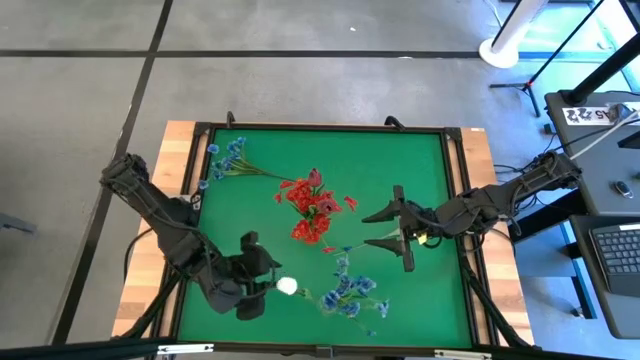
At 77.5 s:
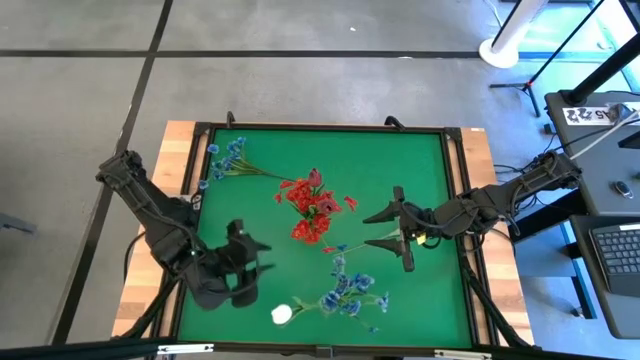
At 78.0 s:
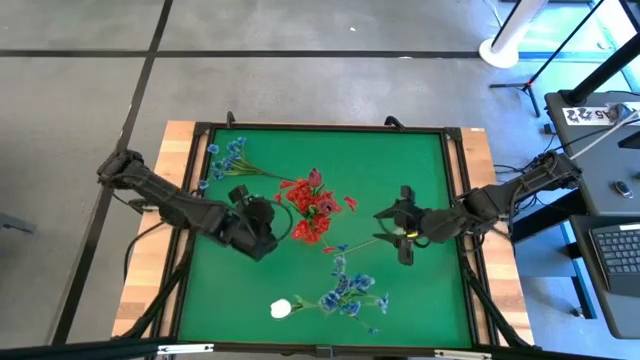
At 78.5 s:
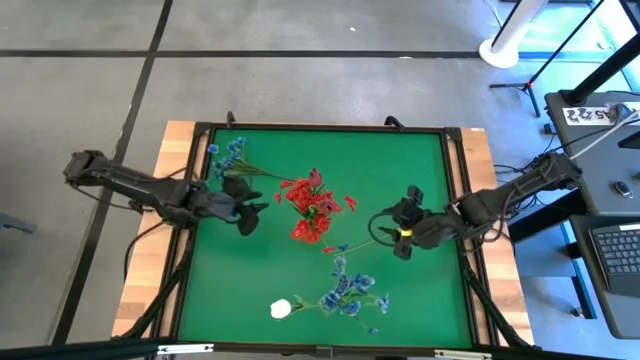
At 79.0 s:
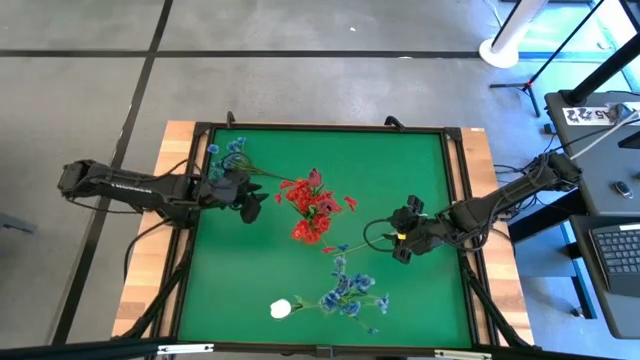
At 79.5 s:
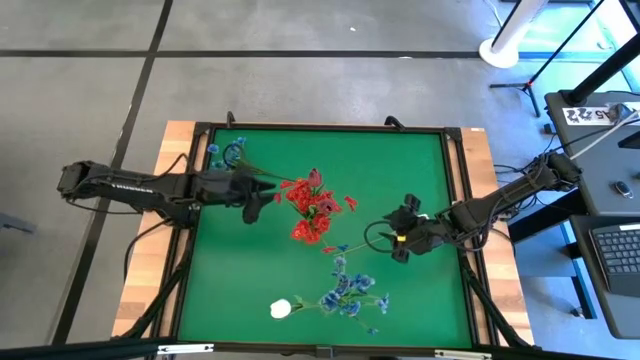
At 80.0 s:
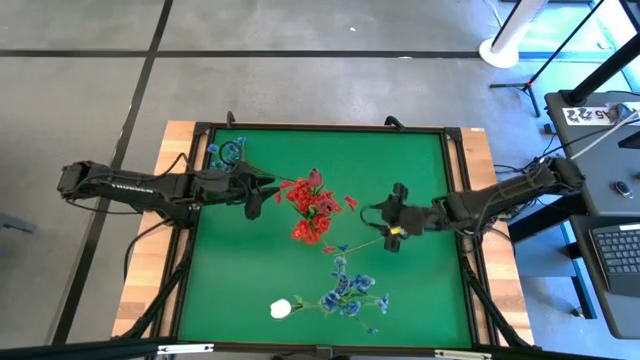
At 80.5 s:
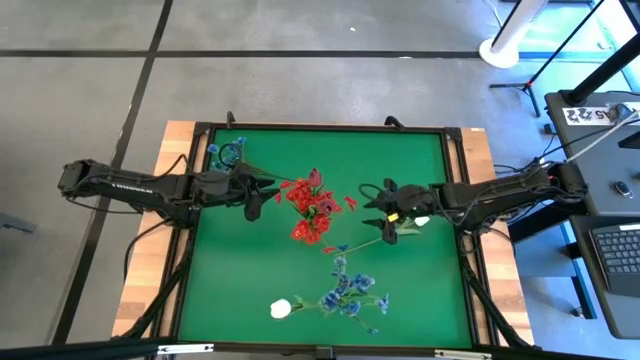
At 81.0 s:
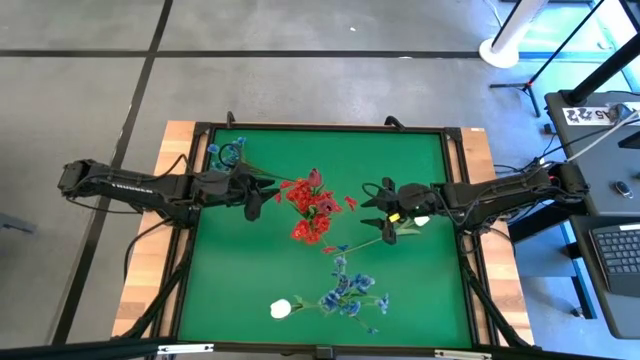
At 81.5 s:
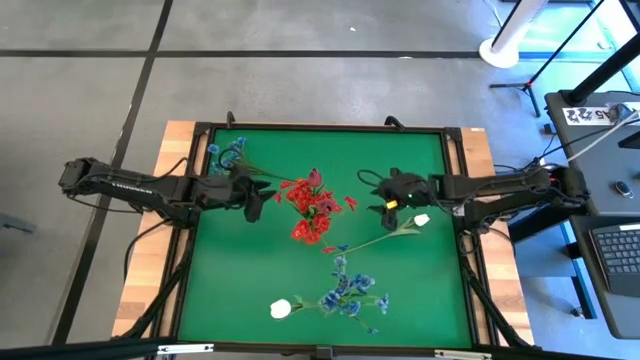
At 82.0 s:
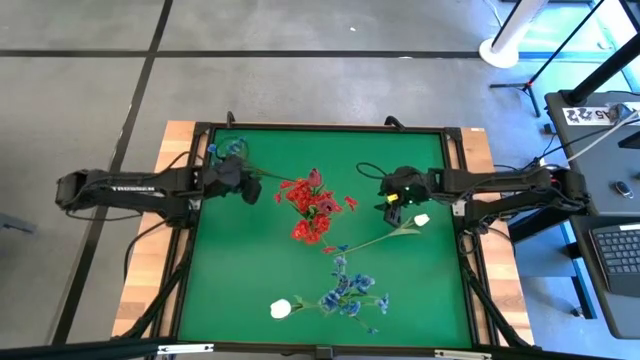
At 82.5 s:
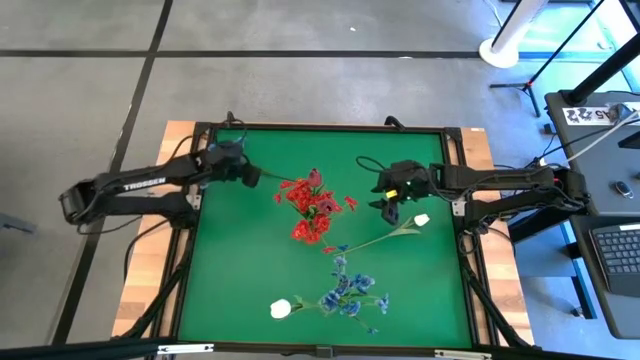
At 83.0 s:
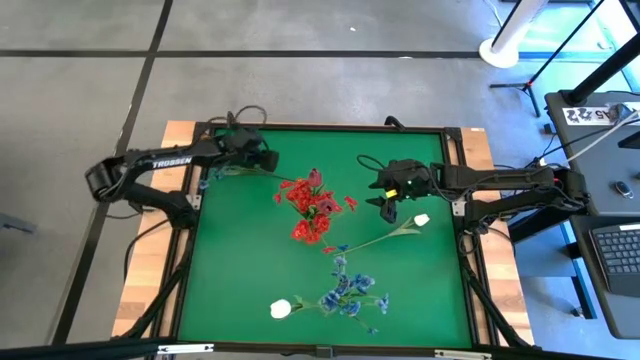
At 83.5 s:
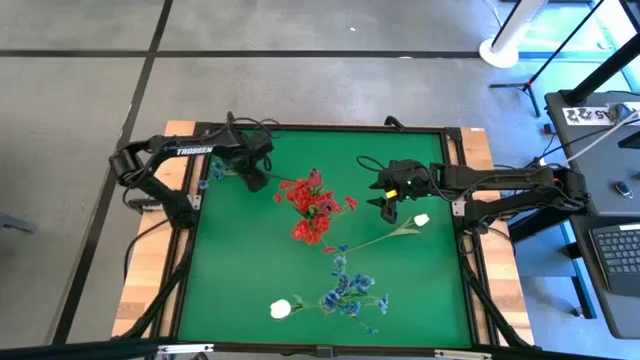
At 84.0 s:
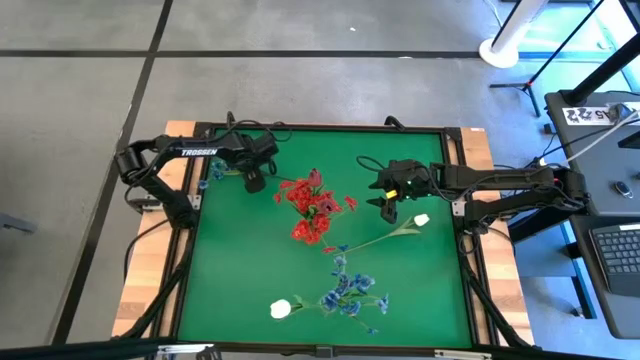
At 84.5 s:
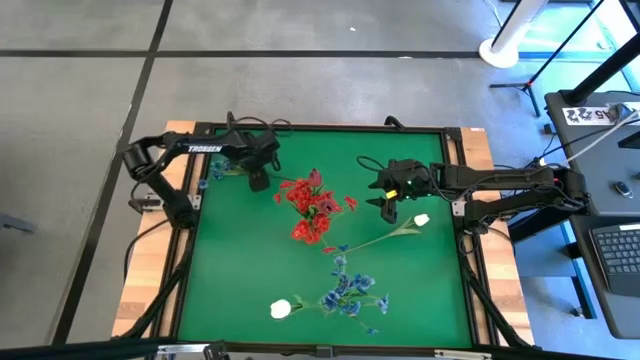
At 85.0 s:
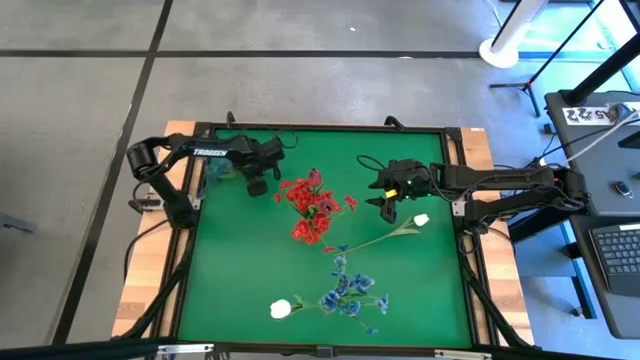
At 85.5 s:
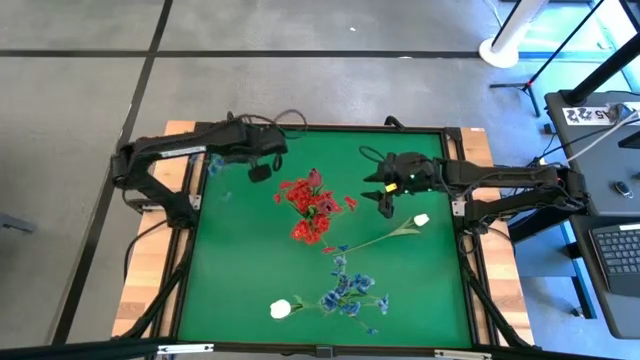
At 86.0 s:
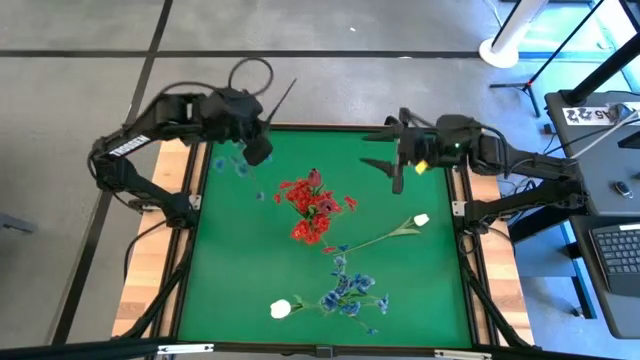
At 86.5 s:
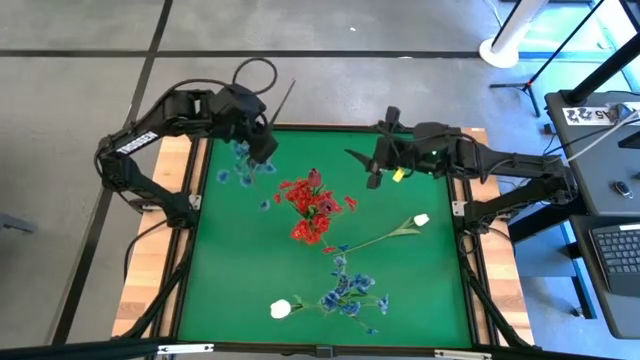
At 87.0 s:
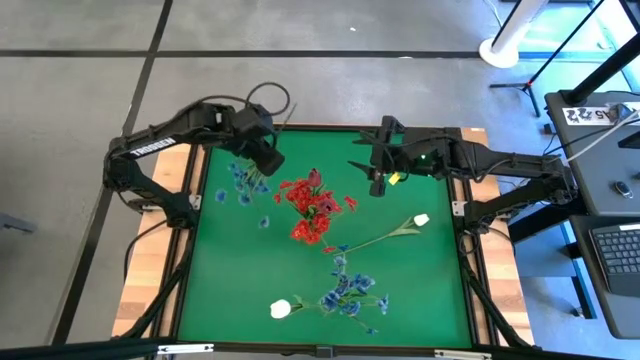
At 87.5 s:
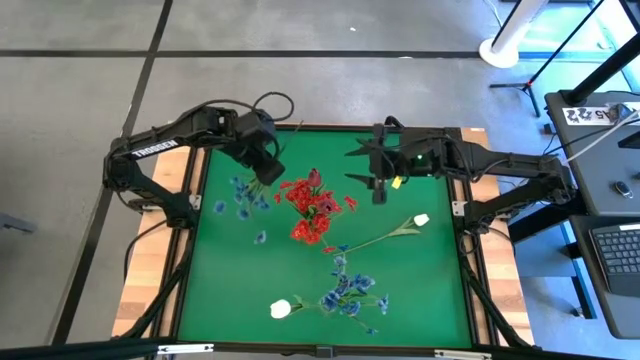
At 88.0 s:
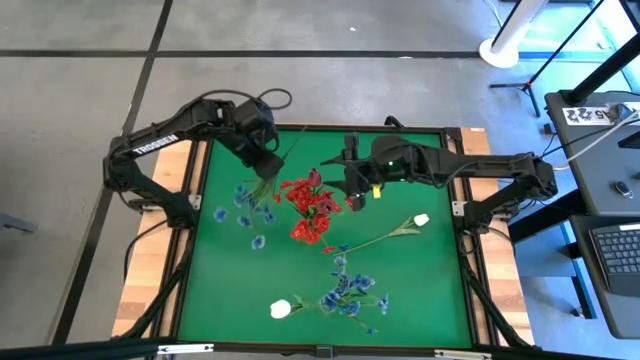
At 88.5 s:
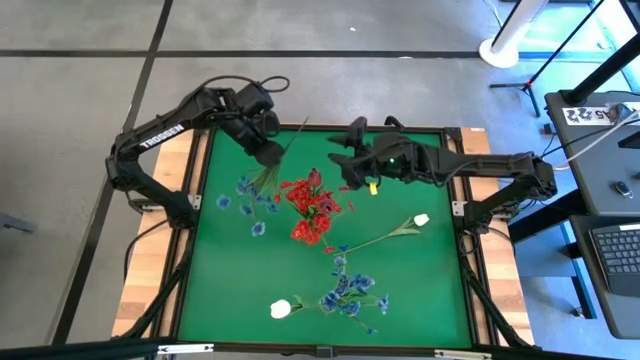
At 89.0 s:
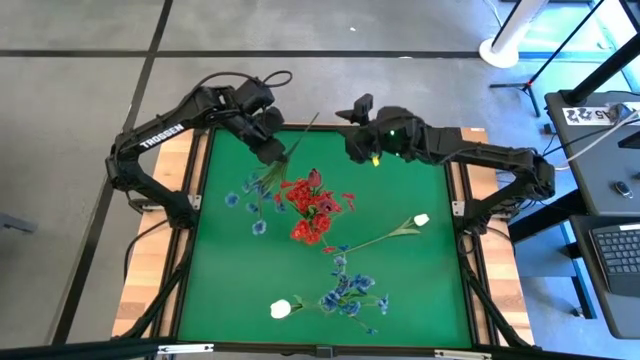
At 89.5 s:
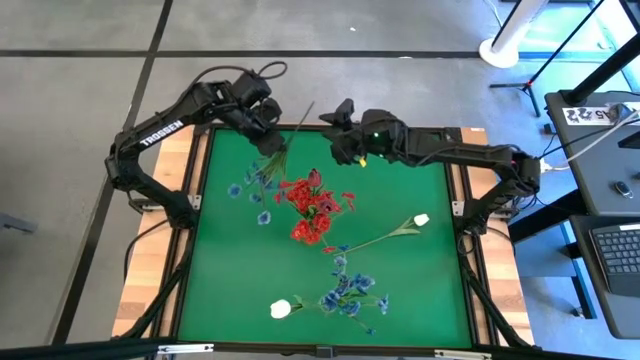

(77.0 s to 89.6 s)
Task: Sort flowers into vase by color
Put the blue flowers into the transparent vase

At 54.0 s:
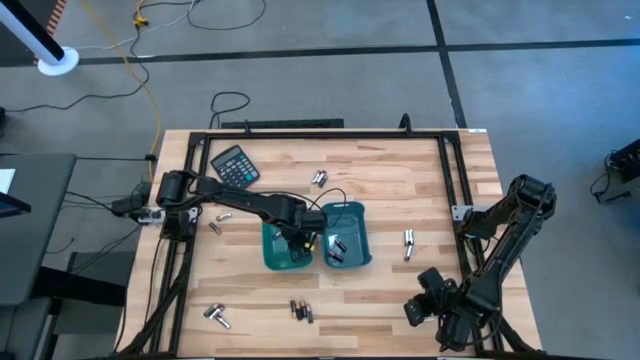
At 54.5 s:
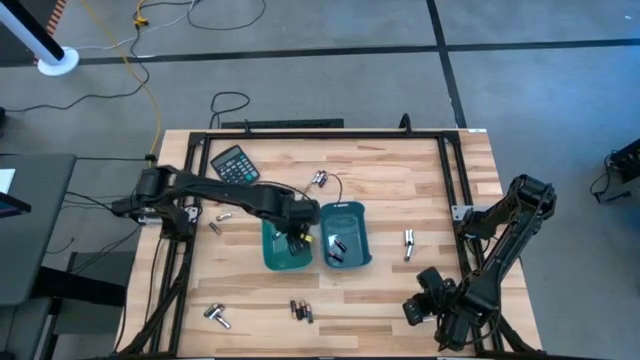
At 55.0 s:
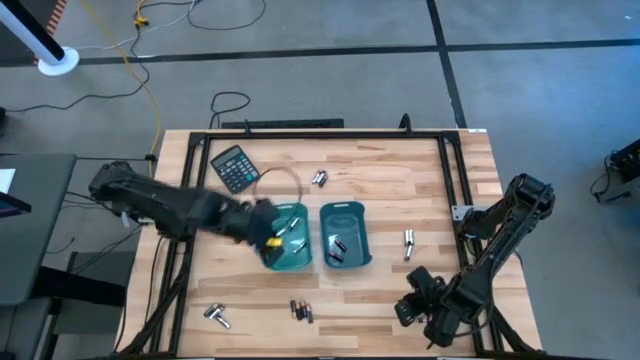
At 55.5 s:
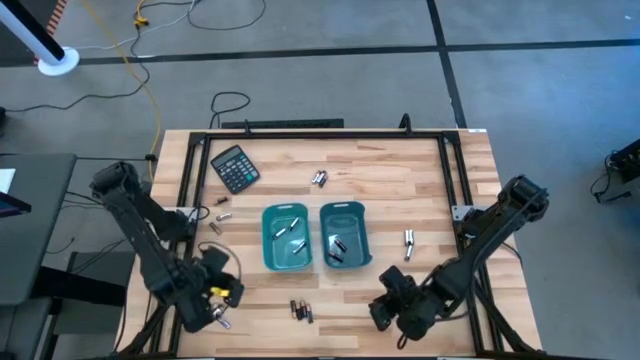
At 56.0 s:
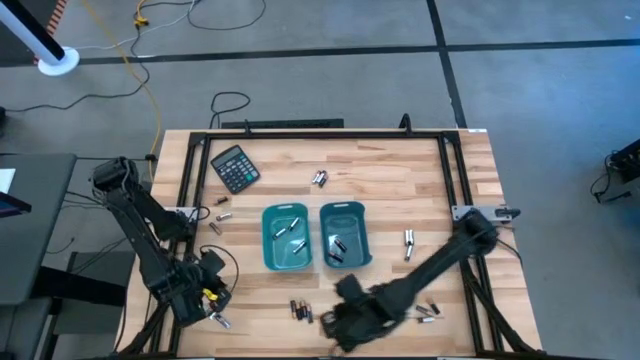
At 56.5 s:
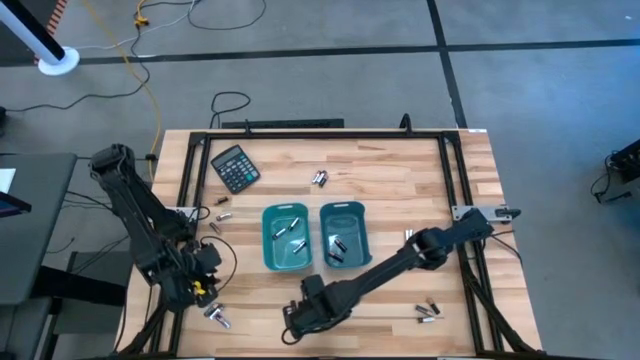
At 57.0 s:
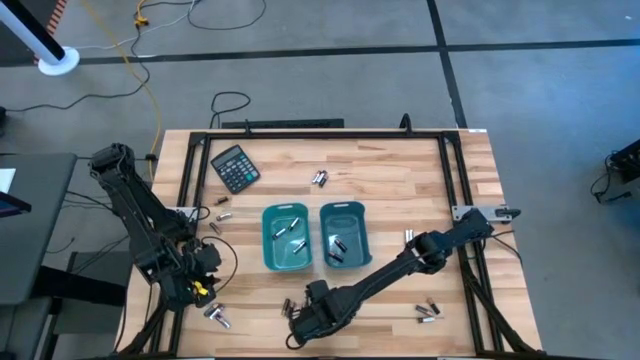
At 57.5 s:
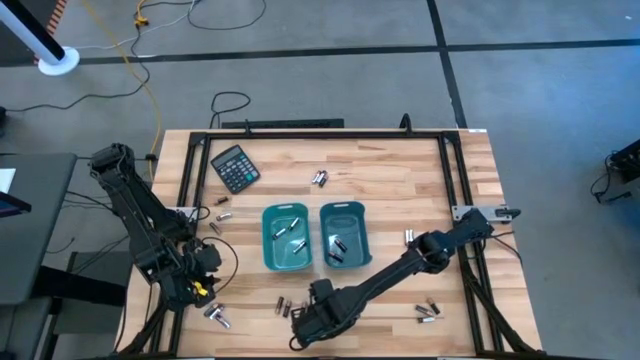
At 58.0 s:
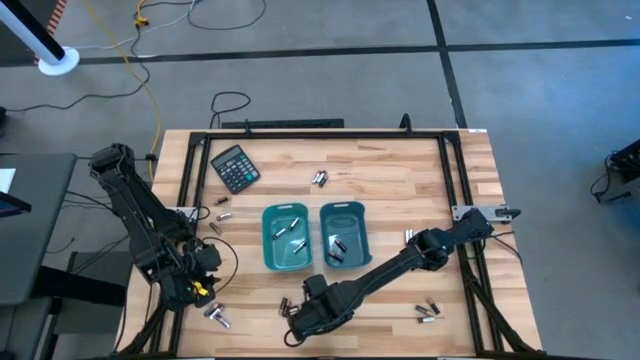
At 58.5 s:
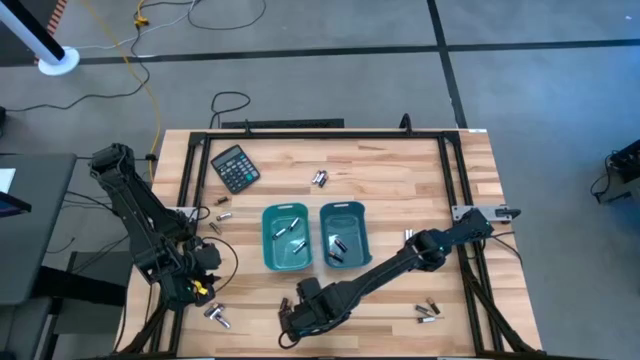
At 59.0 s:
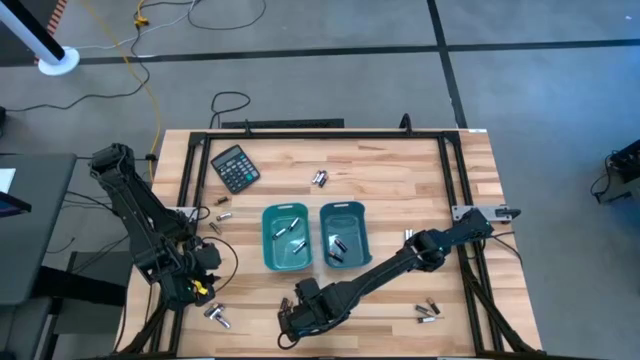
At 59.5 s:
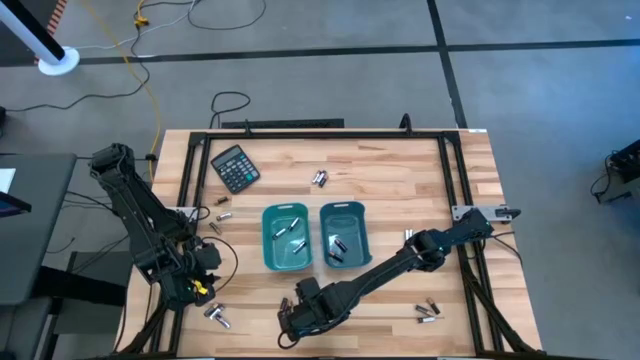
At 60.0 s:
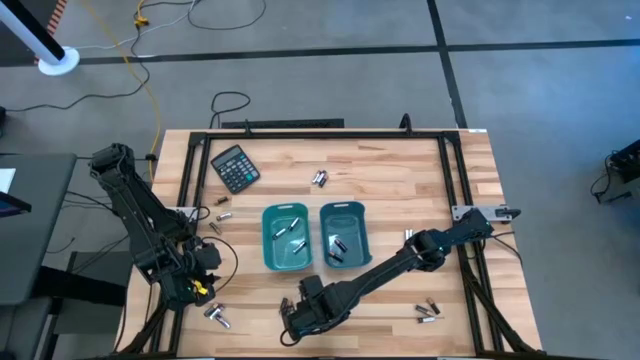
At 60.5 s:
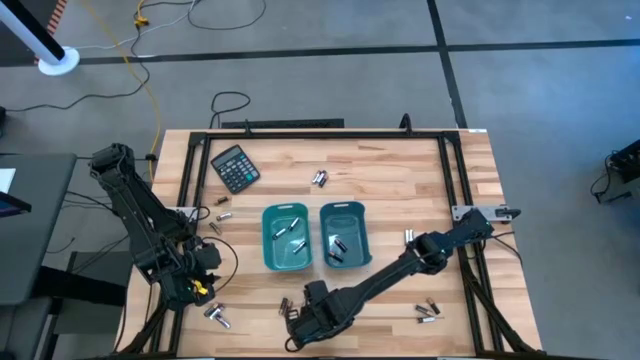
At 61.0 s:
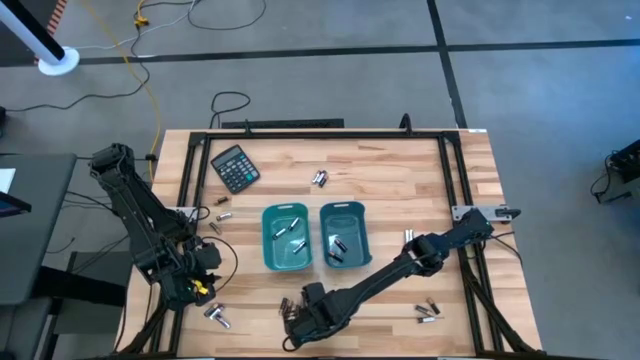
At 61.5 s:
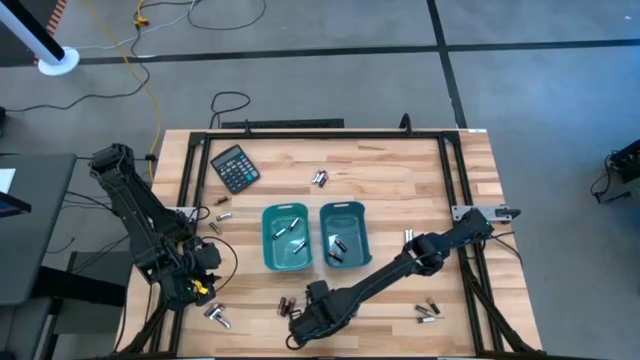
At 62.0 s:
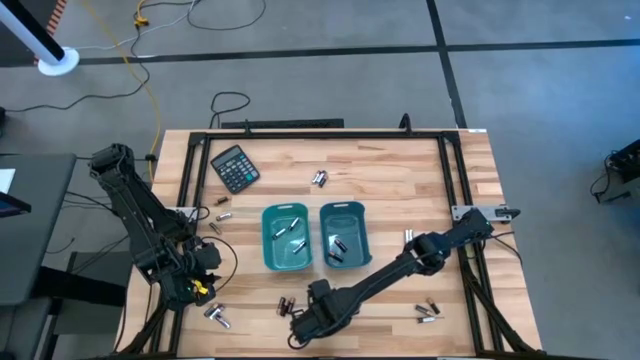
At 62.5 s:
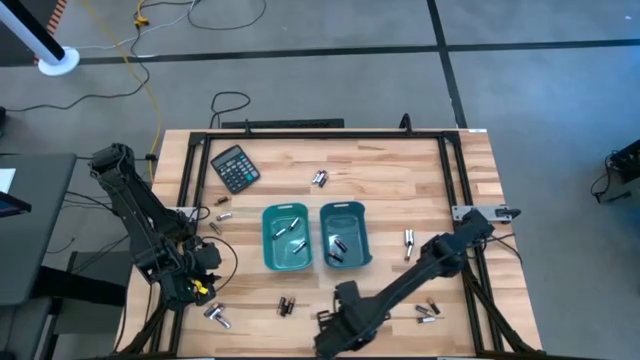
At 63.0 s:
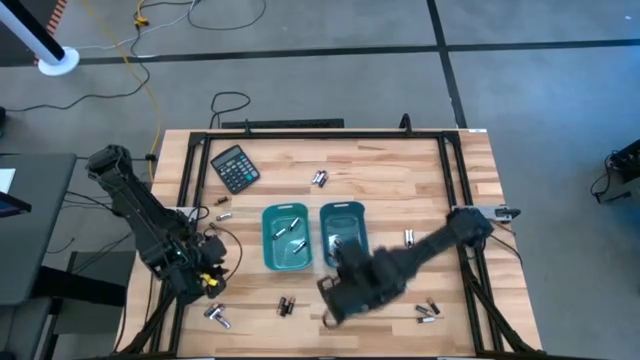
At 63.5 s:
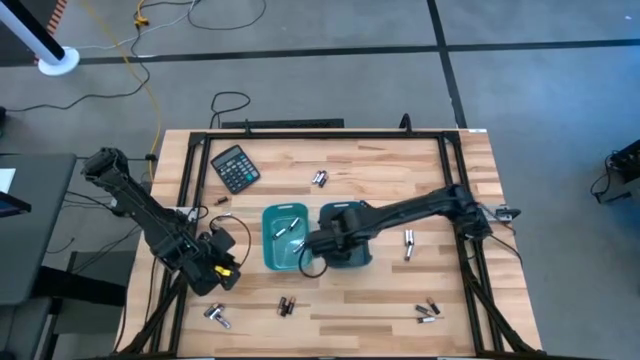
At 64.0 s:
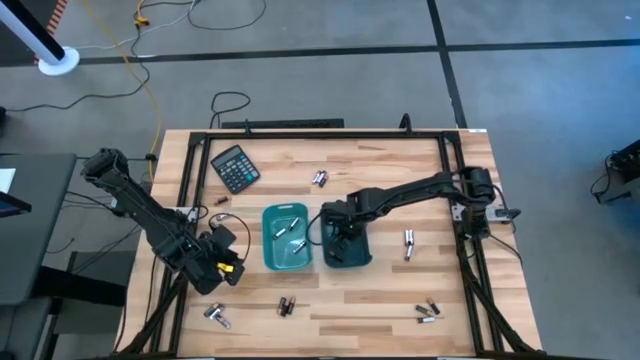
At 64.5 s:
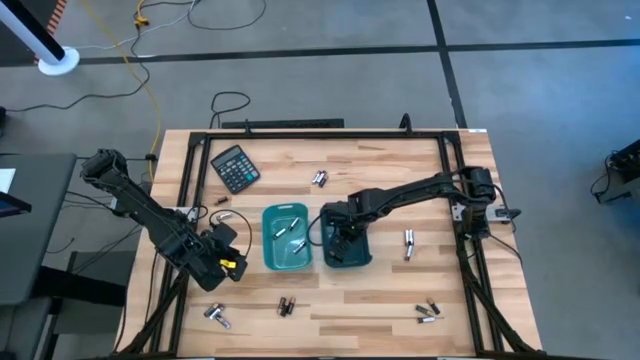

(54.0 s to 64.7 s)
Task: Sort batteries
Put the black battery into the blue bin
